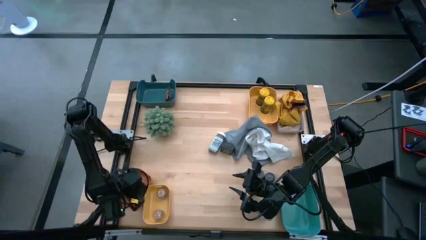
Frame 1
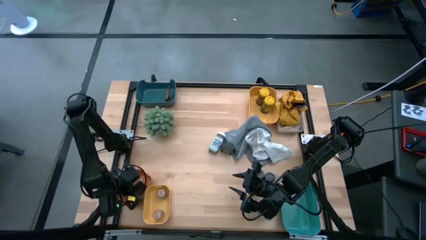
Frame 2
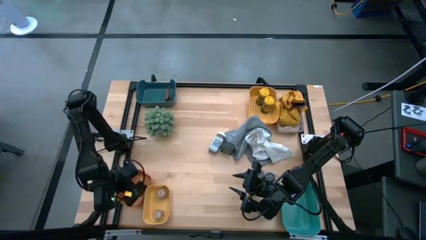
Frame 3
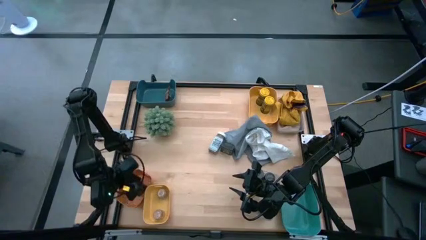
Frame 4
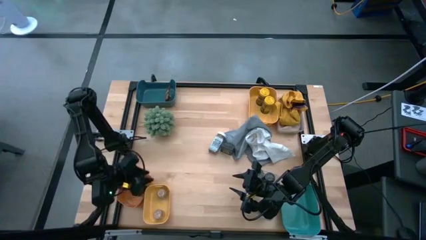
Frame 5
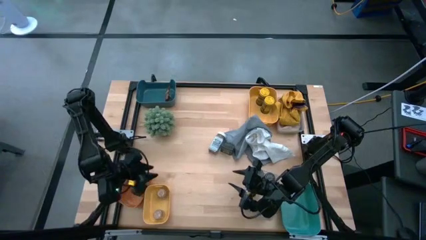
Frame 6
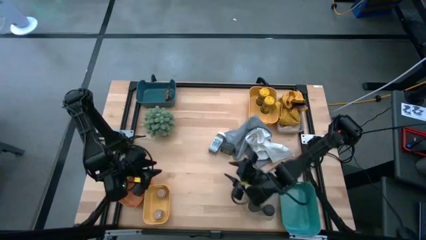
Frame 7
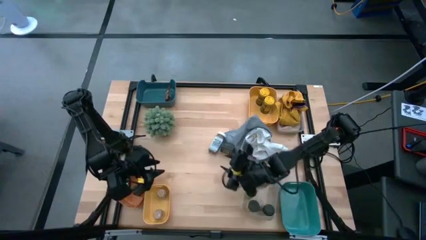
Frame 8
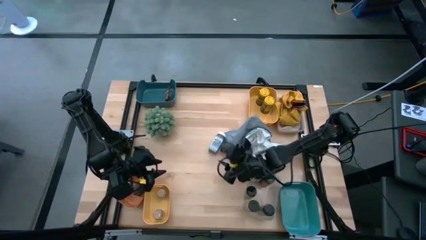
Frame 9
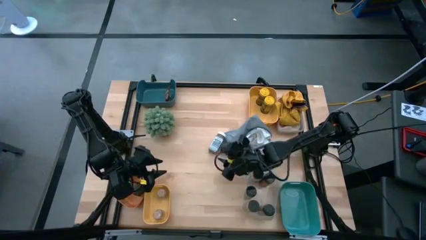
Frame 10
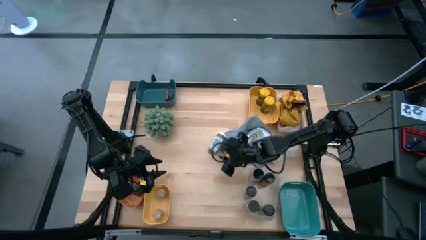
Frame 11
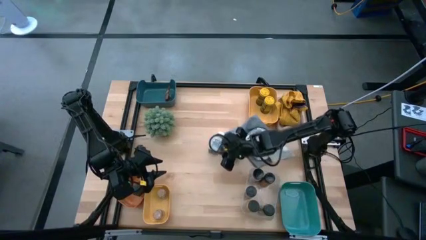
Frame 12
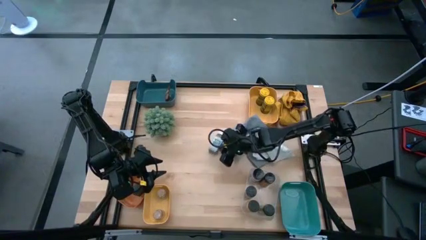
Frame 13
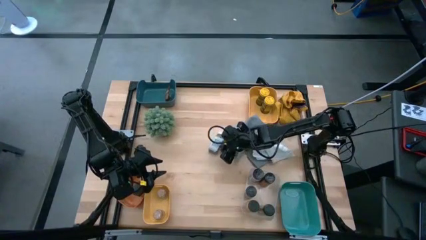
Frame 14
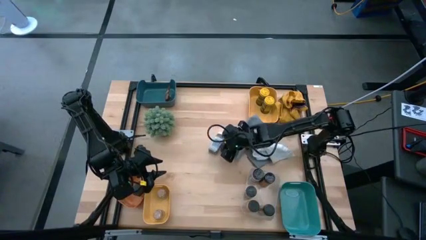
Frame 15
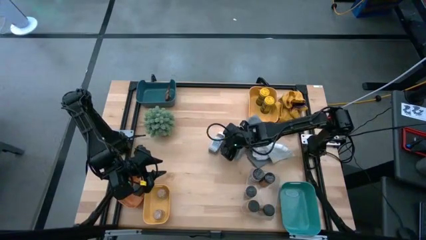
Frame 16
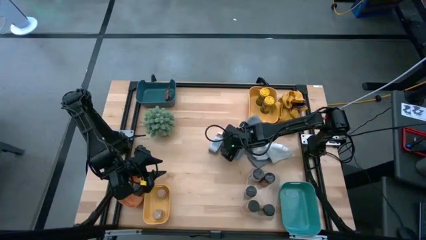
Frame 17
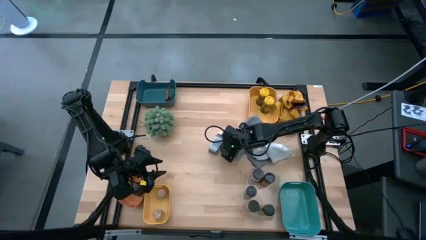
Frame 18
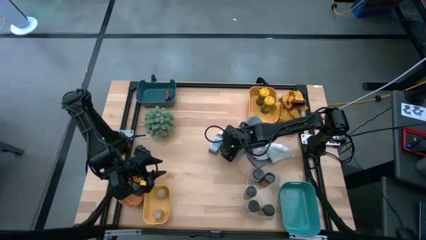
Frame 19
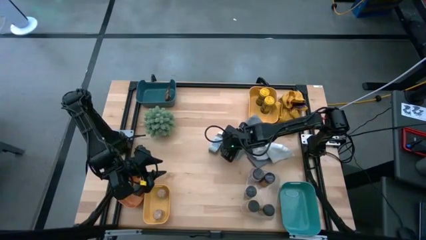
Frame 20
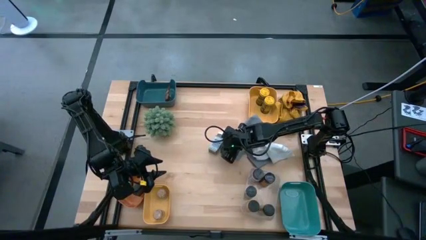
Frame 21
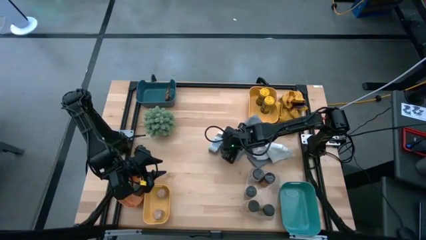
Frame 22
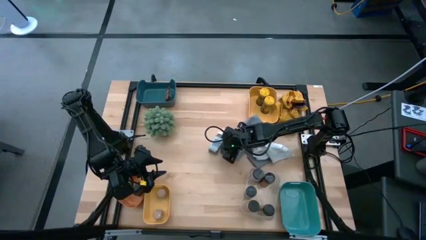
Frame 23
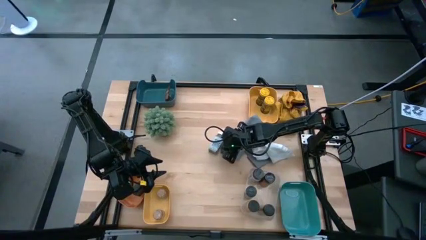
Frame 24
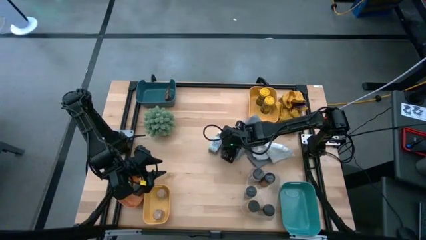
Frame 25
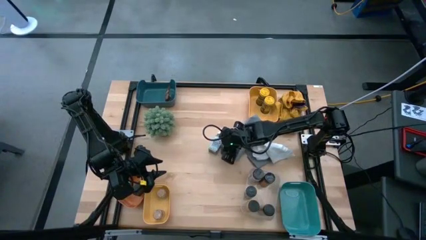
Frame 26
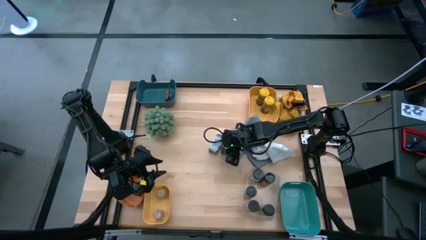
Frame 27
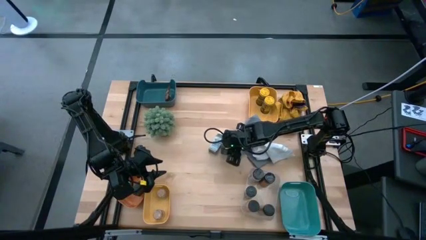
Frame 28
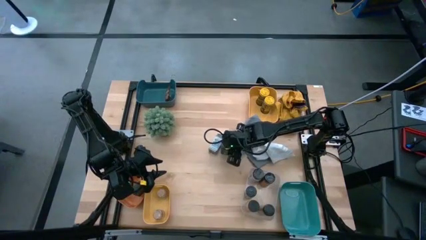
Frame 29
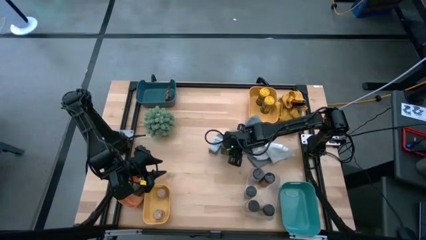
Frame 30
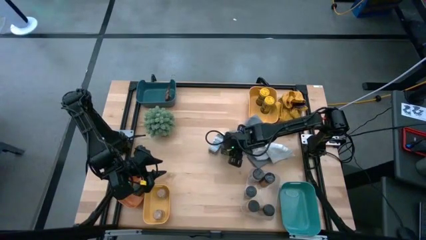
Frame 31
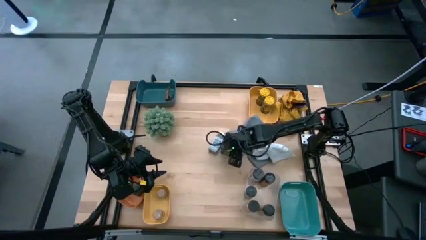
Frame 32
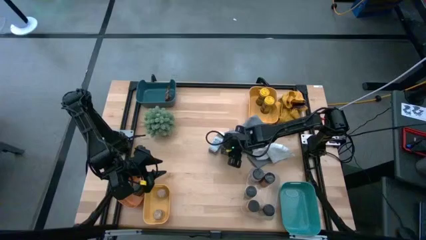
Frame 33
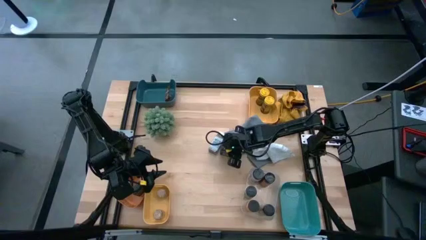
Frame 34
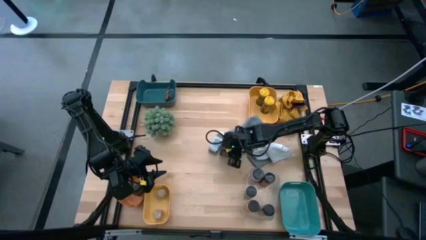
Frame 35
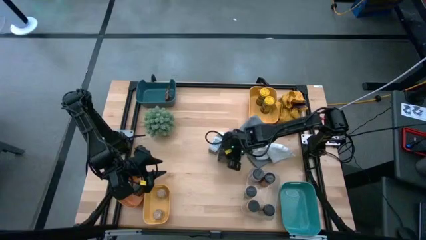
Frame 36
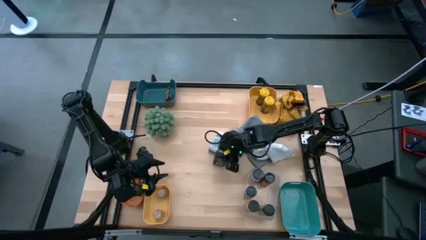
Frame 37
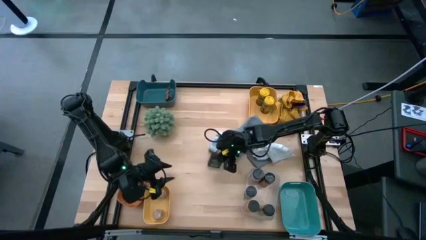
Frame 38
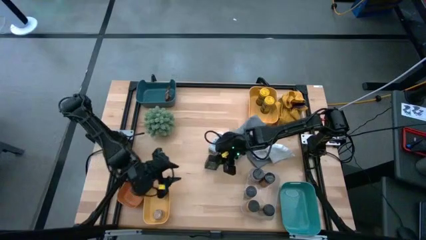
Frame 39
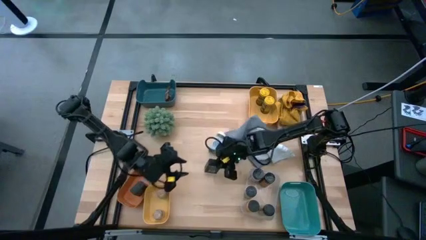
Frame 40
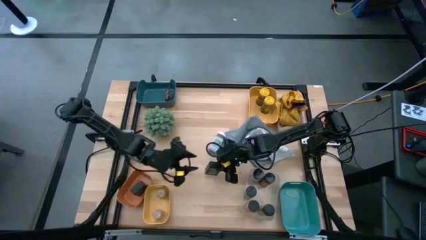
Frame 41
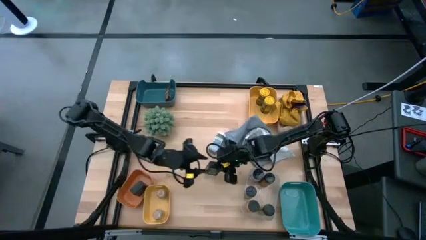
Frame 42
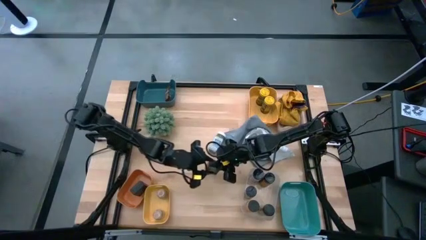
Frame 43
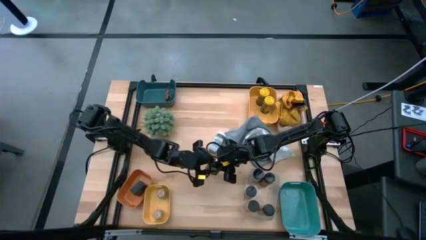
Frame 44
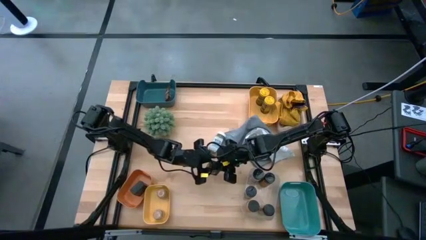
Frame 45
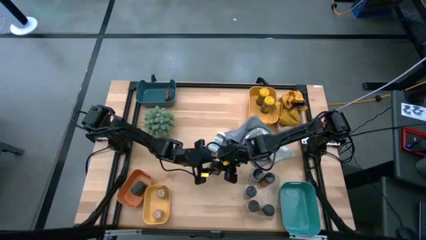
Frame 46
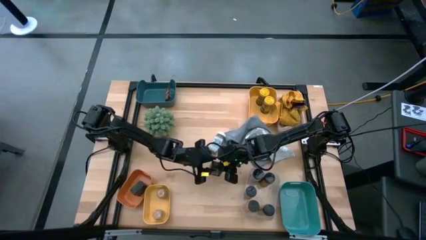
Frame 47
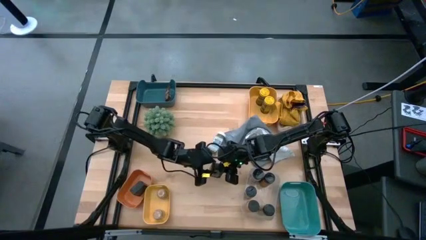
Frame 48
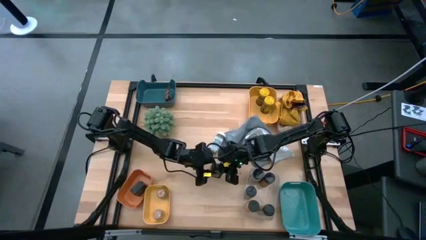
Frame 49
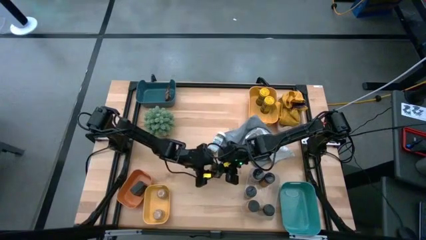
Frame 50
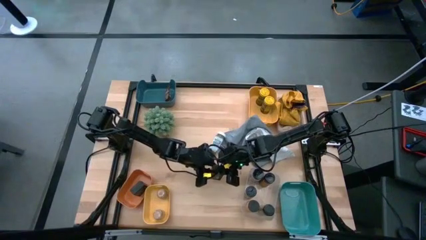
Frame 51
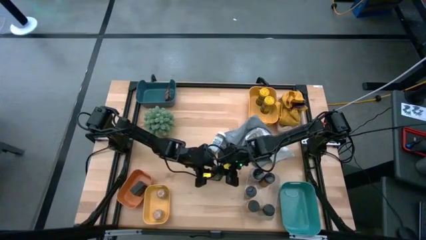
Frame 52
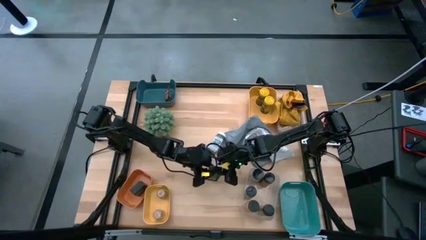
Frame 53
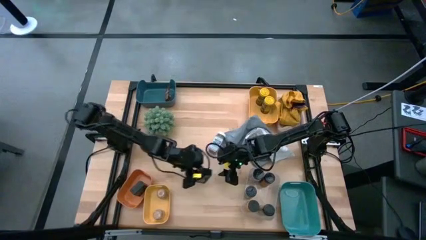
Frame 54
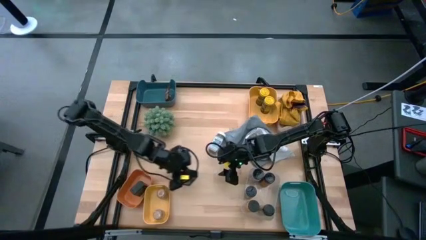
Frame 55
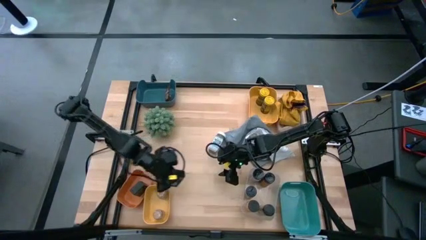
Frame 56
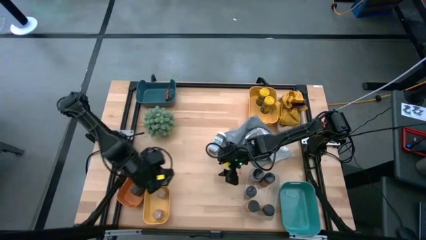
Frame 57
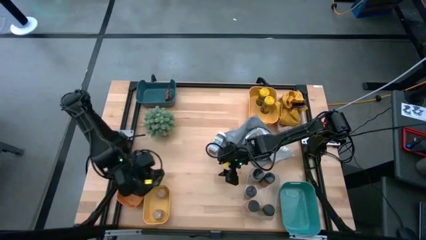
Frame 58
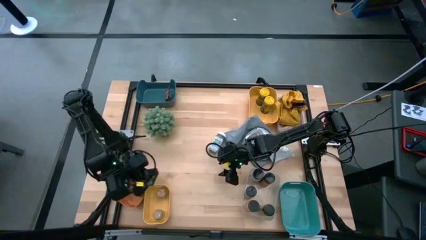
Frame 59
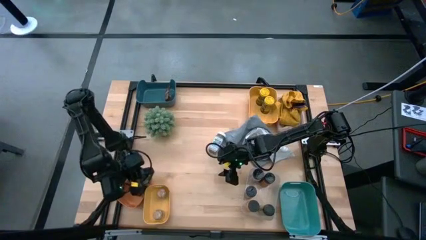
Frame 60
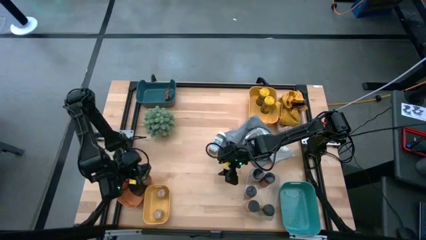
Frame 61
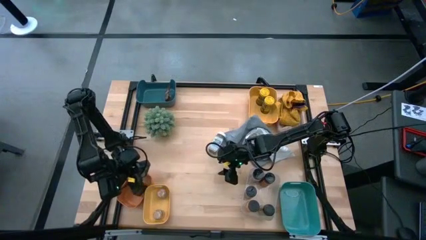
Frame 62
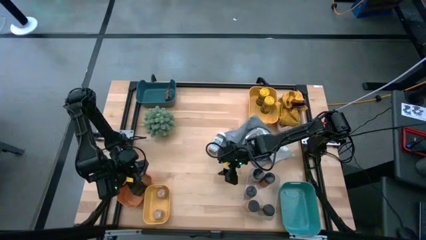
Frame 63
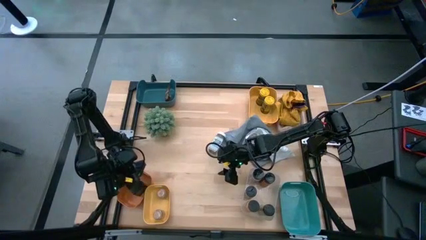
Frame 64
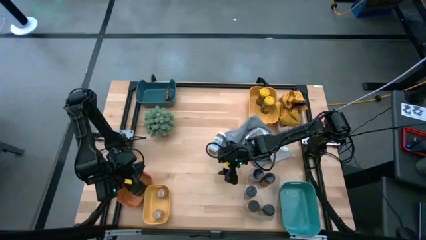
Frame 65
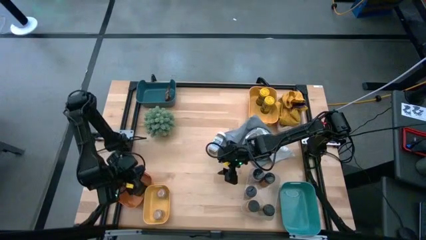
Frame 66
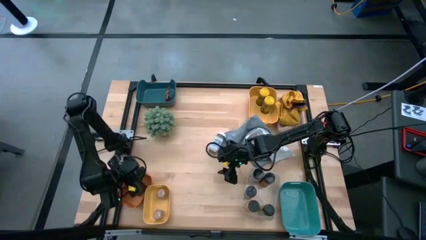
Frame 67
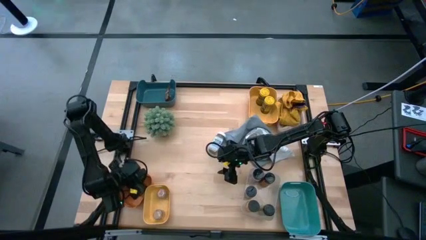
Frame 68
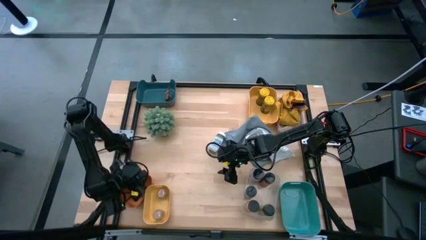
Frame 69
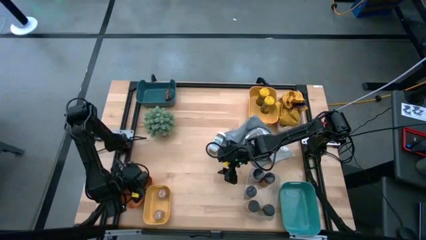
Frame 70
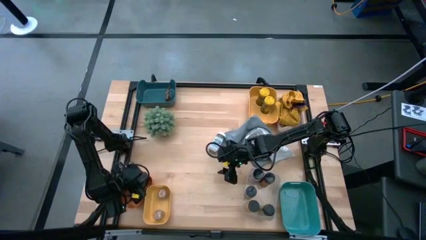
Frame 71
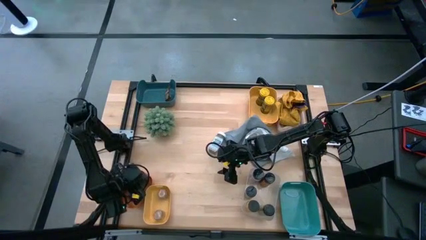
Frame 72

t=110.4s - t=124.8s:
Task: Sort spices by type
Put the black seasoning can into the orange bin
